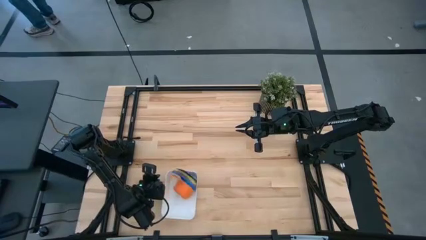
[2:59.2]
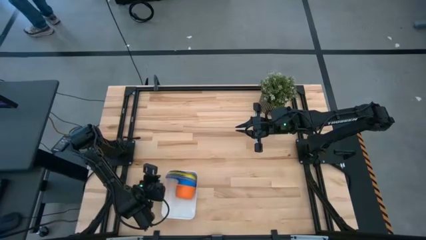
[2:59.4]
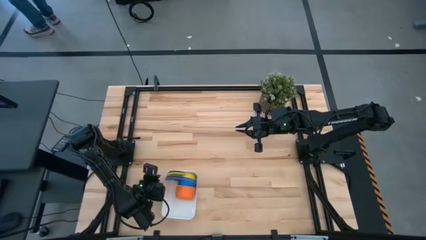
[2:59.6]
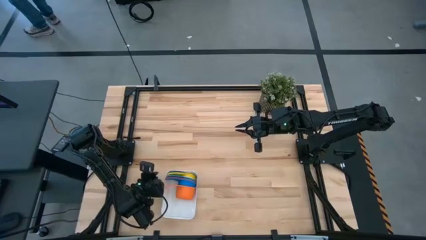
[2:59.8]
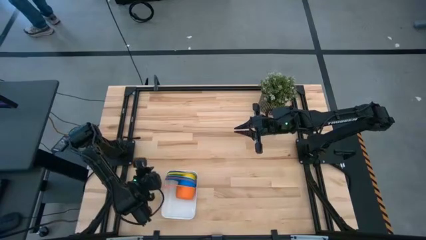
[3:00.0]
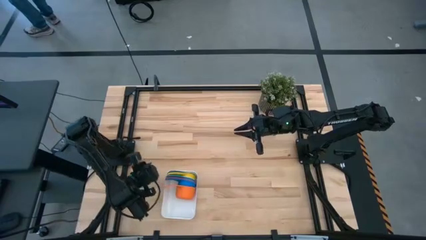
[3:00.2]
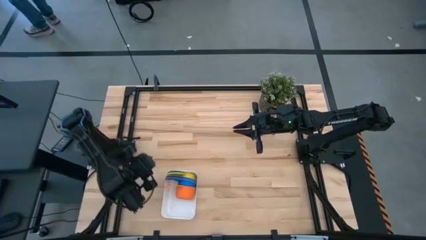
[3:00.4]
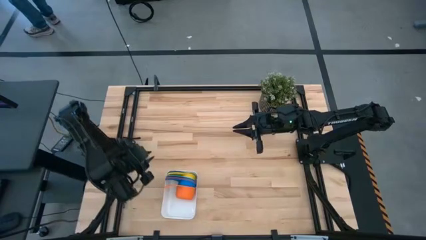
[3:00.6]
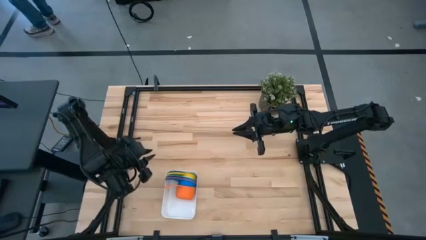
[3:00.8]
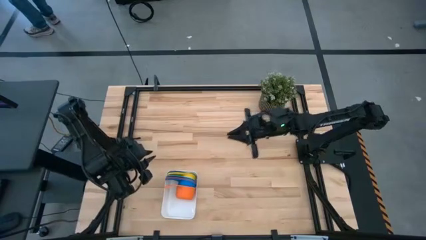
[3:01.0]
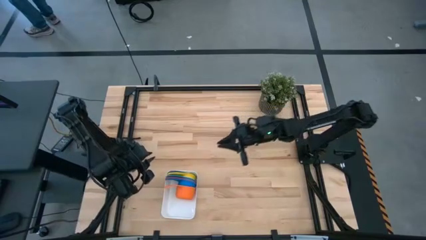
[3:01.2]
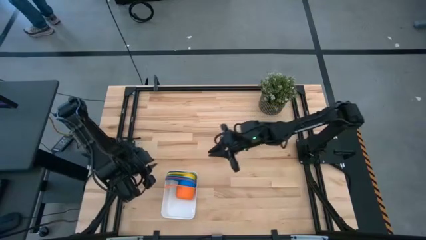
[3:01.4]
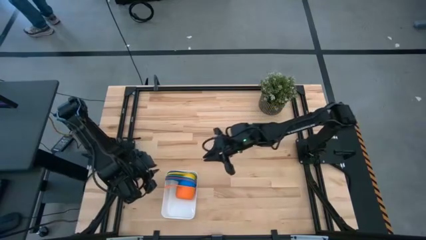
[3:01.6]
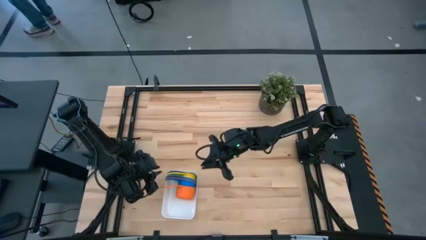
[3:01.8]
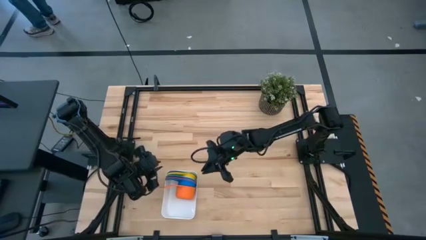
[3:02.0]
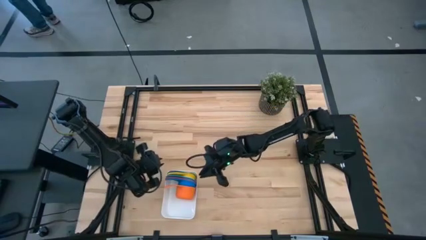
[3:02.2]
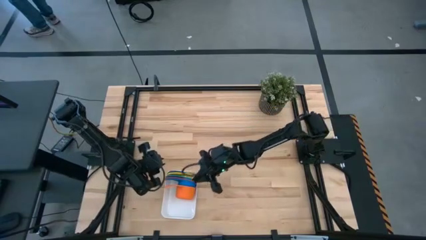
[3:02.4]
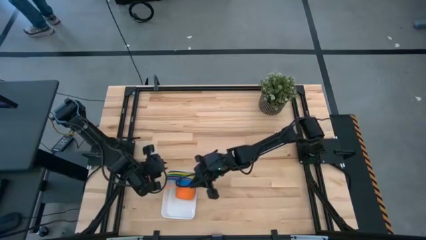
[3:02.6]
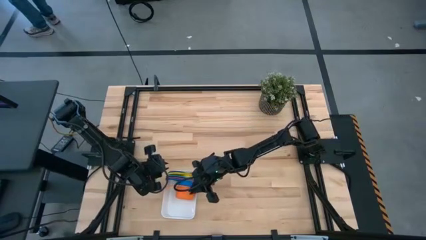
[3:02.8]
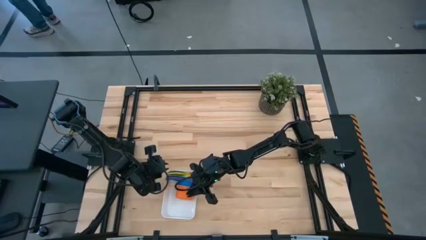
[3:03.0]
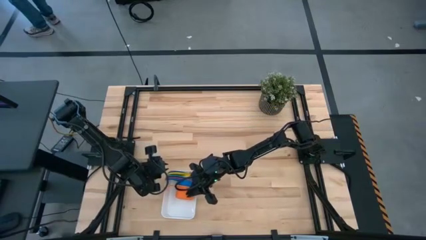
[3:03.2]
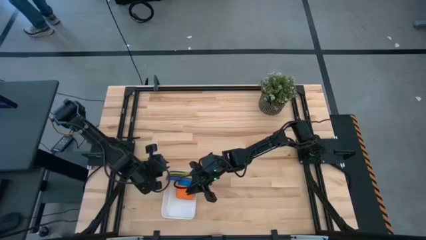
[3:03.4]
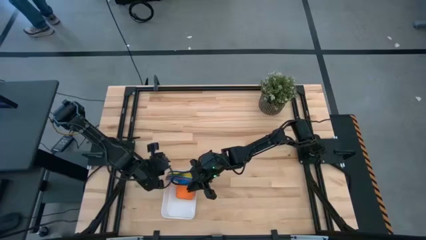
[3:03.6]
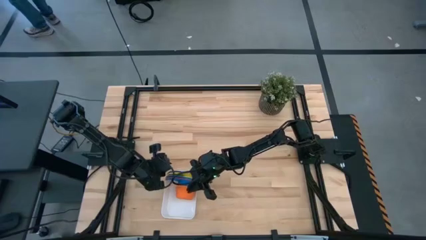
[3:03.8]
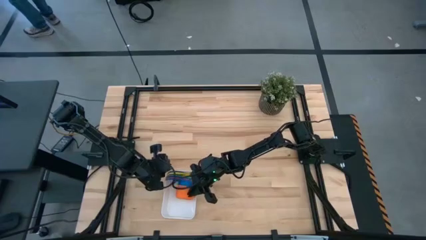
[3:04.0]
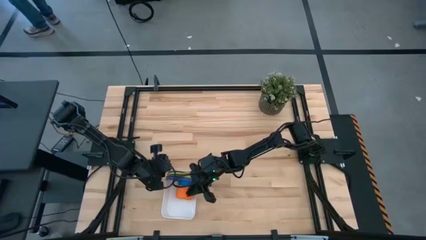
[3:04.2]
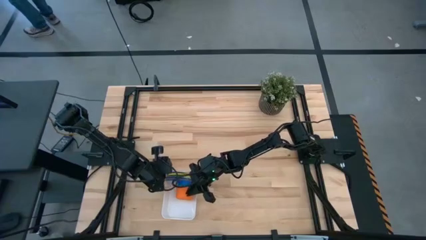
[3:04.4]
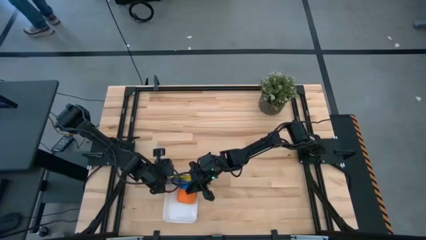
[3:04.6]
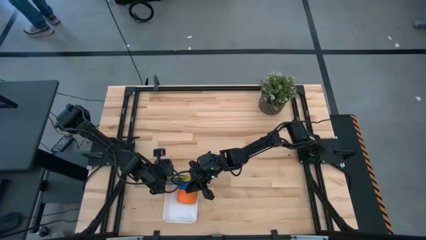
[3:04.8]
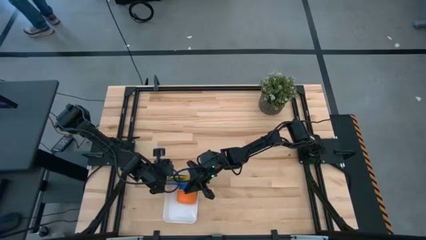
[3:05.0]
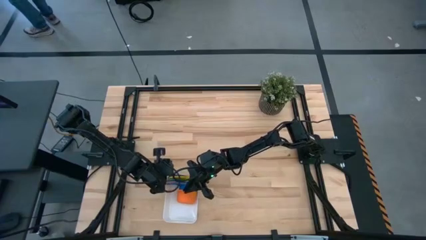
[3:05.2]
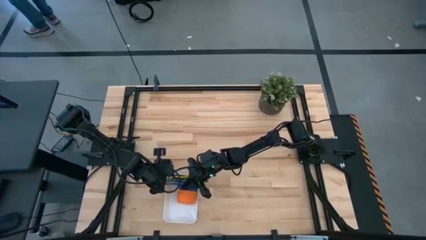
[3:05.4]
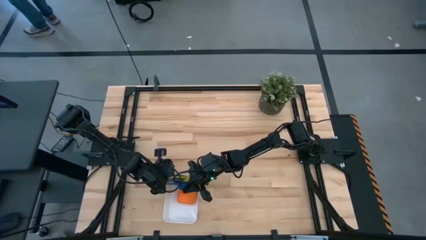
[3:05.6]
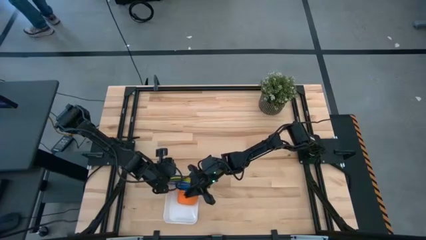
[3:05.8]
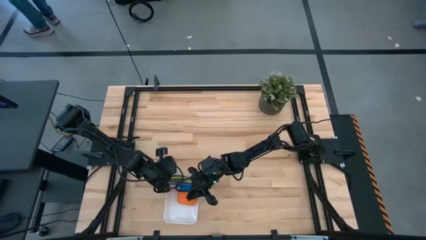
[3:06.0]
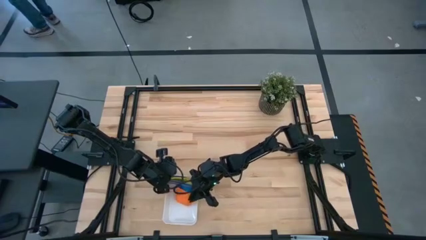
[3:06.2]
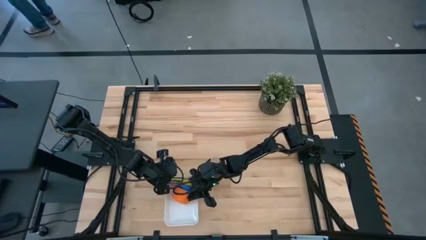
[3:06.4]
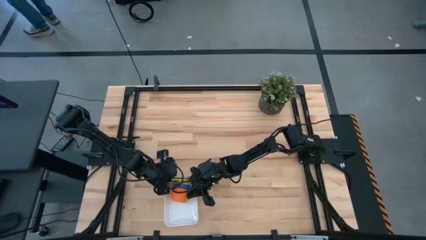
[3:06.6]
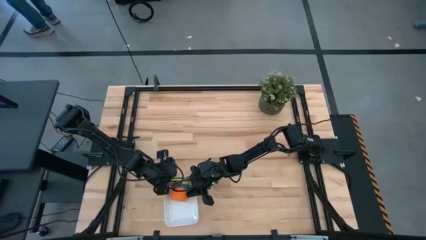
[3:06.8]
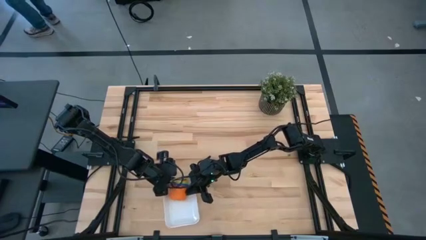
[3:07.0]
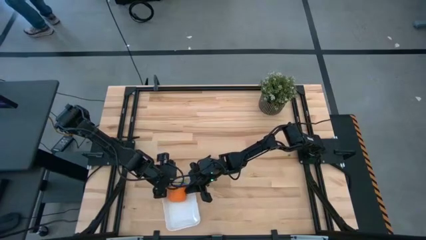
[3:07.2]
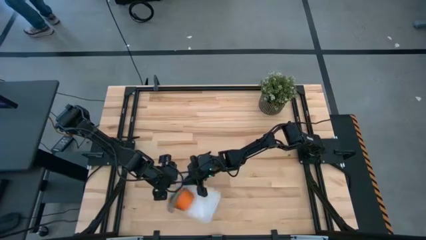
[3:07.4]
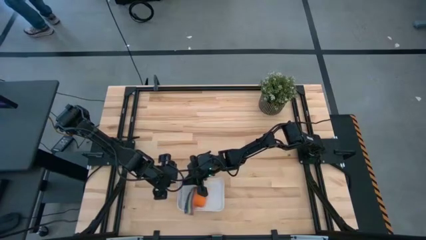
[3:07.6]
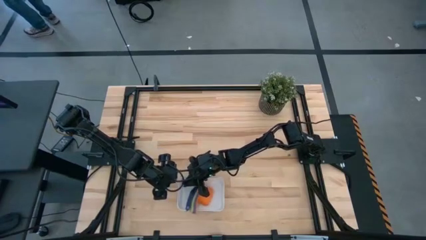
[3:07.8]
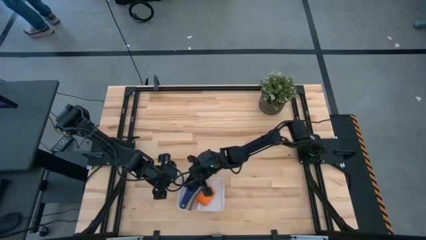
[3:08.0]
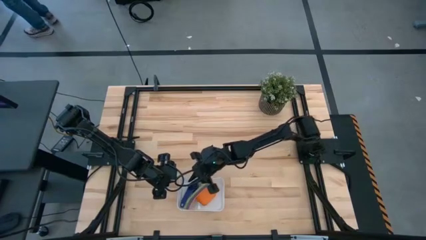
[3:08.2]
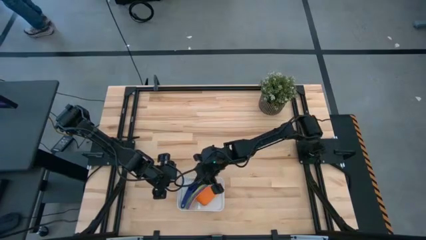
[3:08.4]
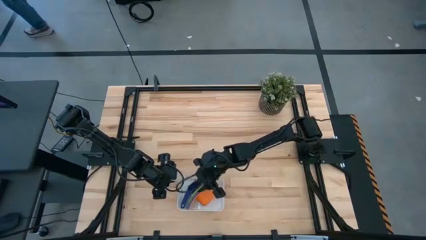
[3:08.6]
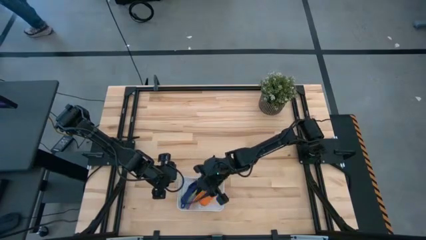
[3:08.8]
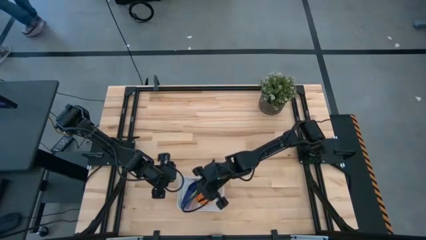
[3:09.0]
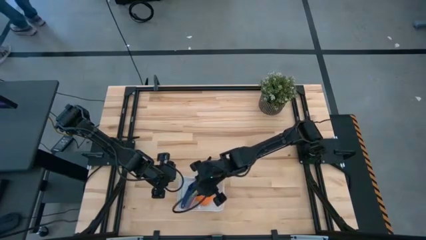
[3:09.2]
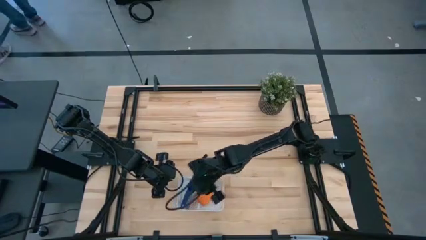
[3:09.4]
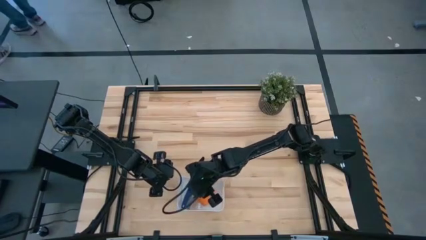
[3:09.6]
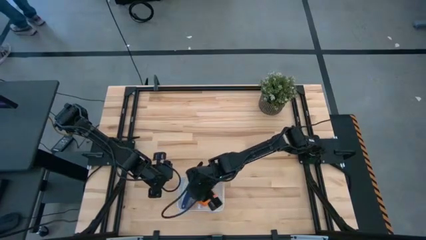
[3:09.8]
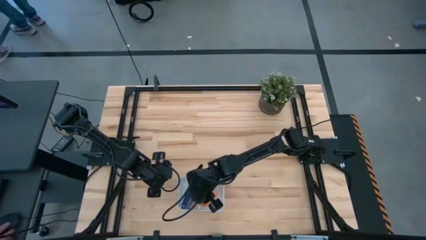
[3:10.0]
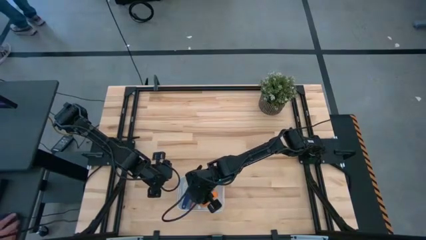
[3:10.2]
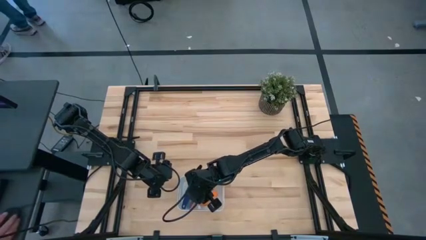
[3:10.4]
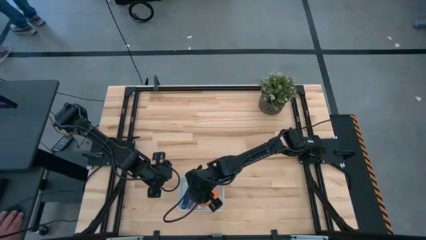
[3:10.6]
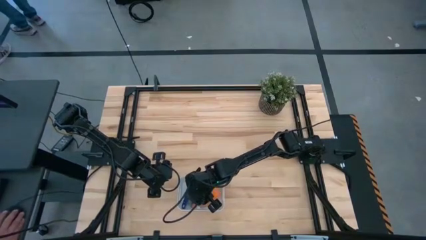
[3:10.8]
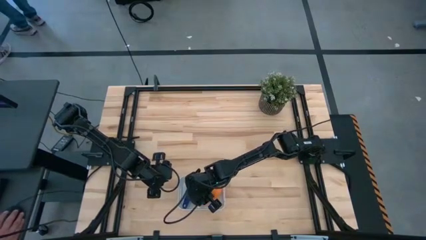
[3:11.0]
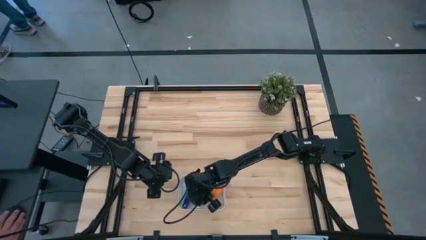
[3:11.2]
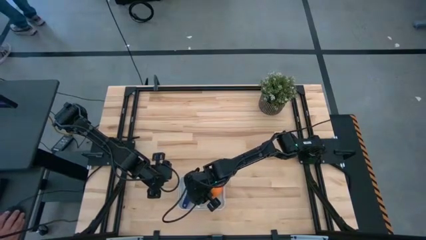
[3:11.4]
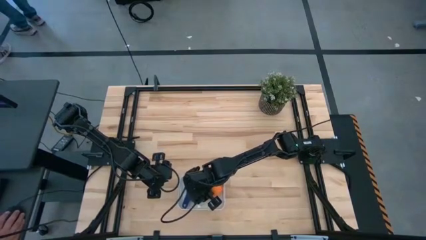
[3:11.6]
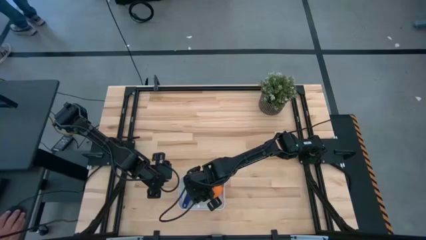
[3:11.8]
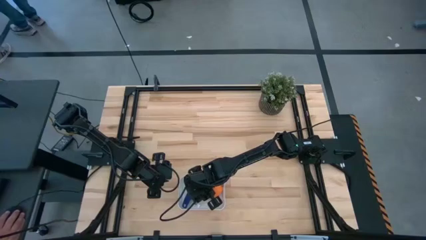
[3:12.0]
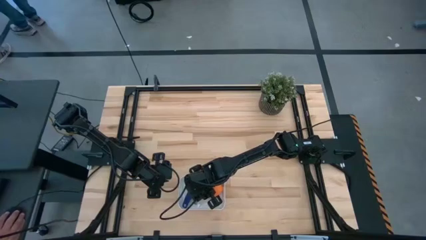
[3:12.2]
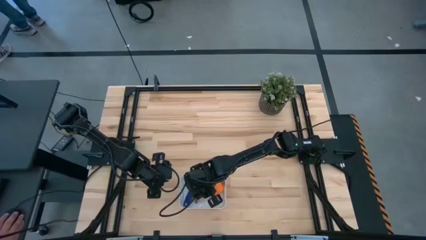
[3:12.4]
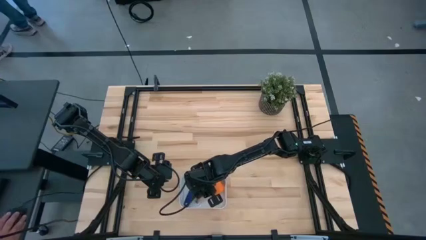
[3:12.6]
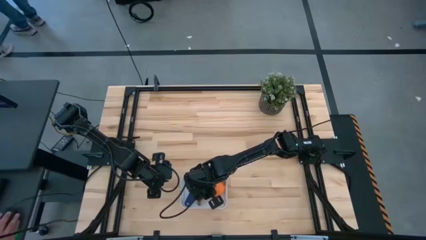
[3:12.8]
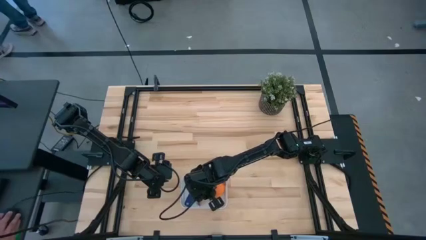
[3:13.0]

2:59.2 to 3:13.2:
Task: Nest measuring cups in basket
Adjust the nested measuring cups in the white bin

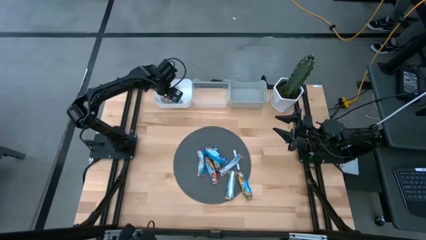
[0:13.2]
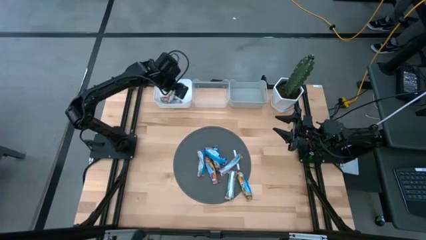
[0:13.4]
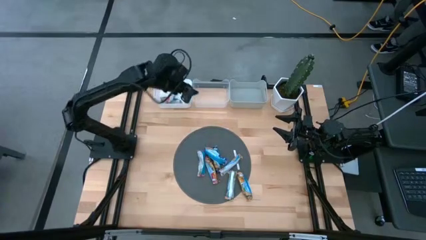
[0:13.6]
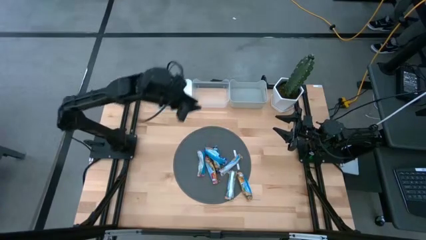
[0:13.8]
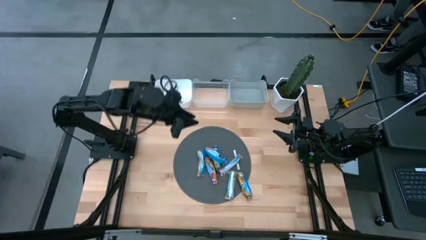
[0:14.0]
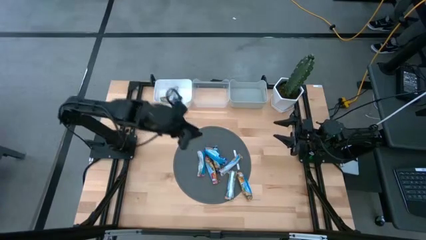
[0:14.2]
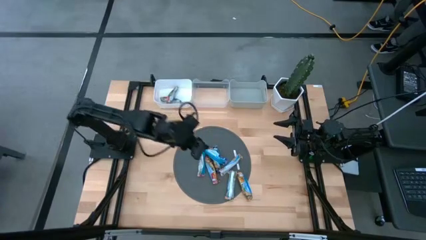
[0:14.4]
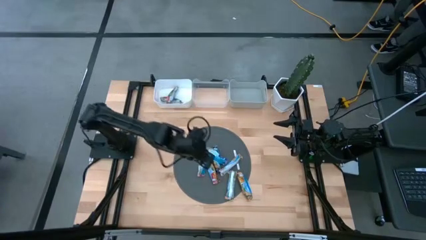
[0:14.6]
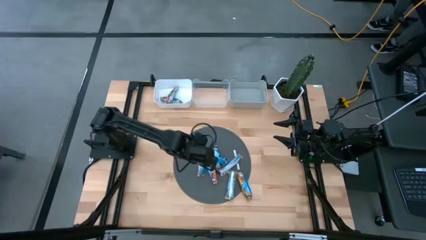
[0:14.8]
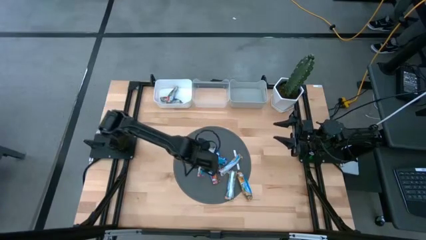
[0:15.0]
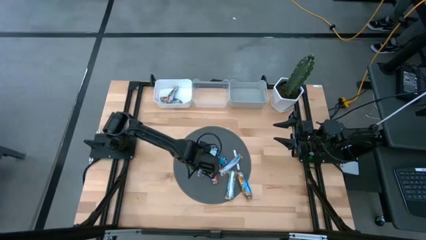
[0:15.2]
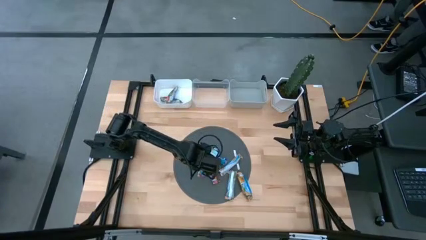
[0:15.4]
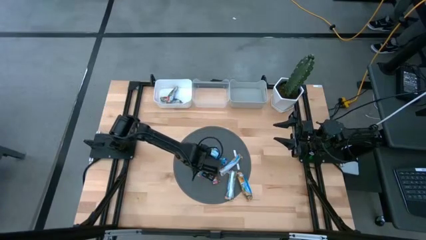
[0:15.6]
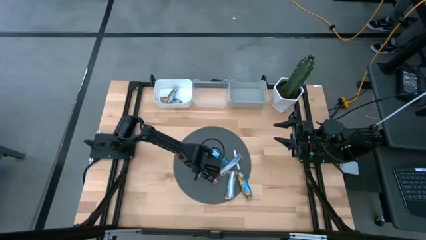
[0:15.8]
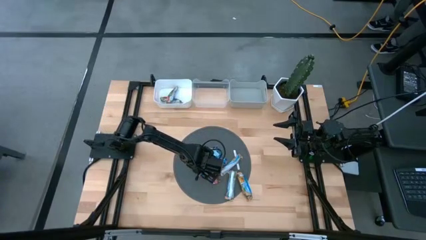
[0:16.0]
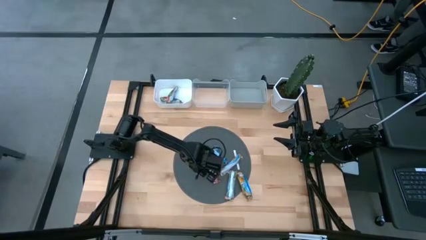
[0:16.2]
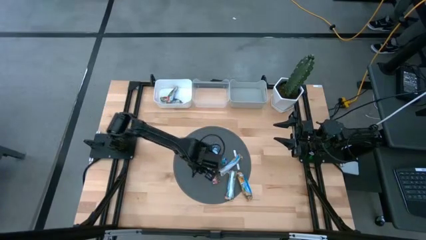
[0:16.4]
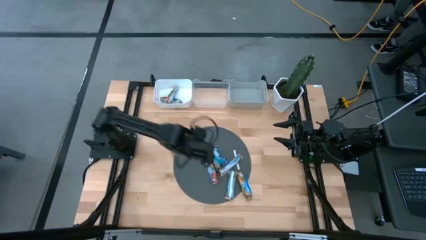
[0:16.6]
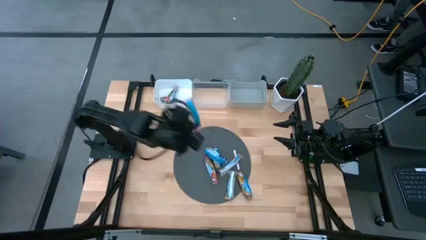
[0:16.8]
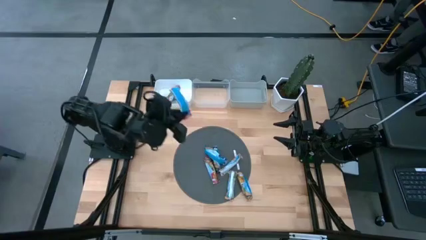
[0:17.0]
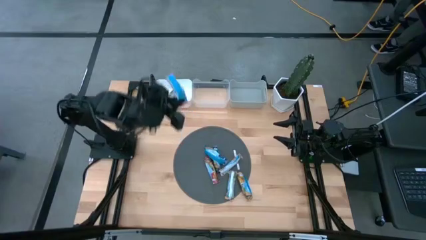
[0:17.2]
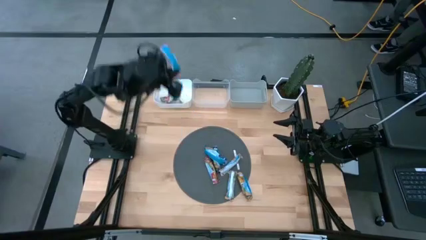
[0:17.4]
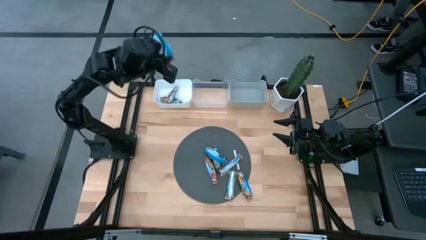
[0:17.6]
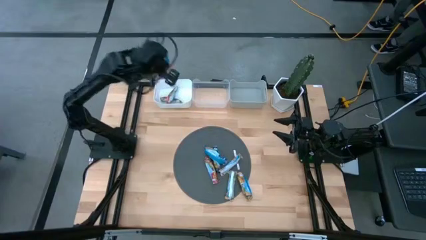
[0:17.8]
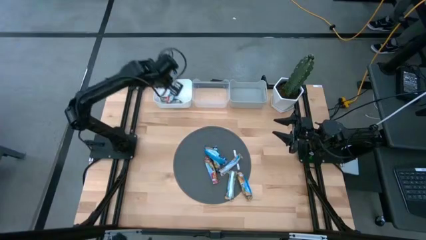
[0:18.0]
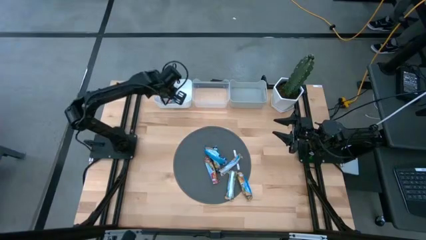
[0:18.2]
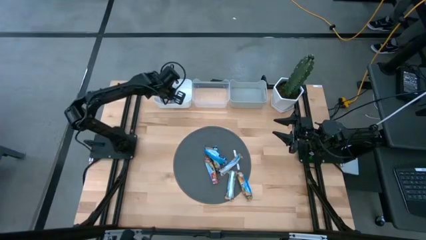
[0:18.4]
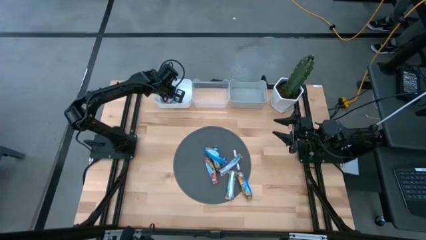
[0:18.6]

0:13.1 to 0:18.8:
Task: Pick and place Granola Bars by type
Put the red granola bar into the white bin
